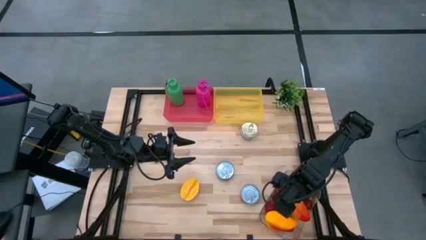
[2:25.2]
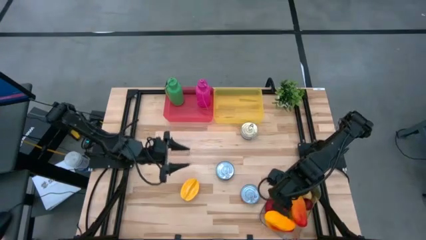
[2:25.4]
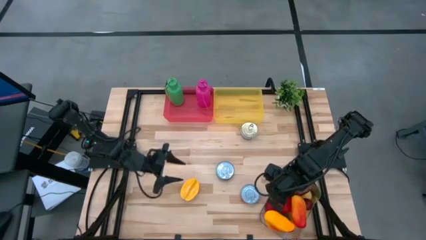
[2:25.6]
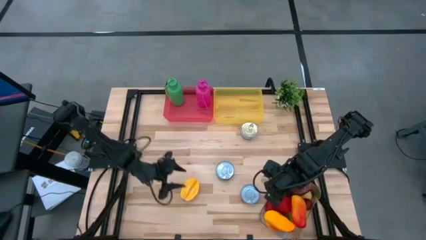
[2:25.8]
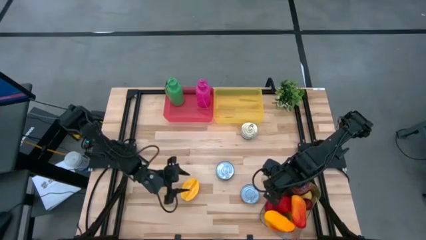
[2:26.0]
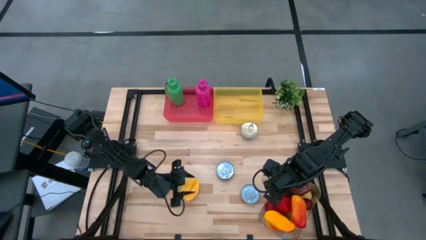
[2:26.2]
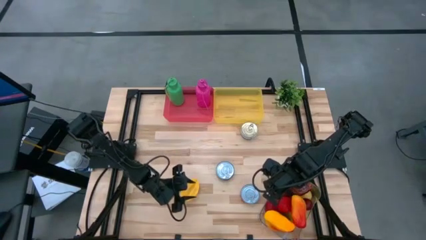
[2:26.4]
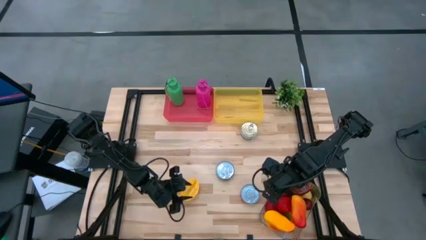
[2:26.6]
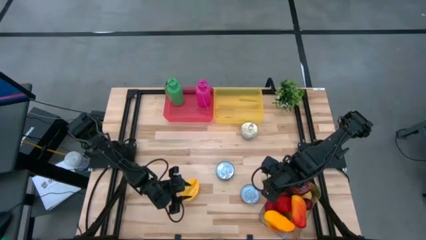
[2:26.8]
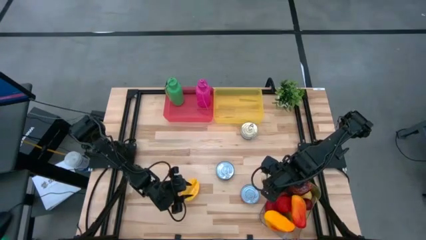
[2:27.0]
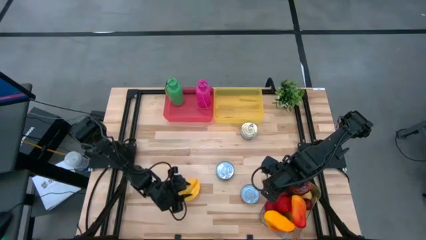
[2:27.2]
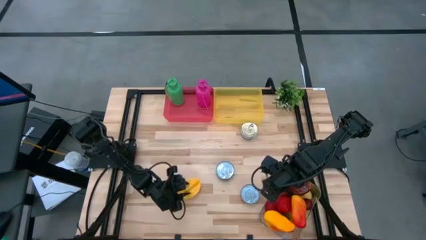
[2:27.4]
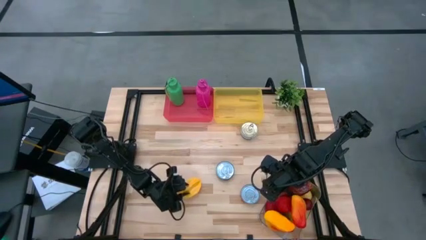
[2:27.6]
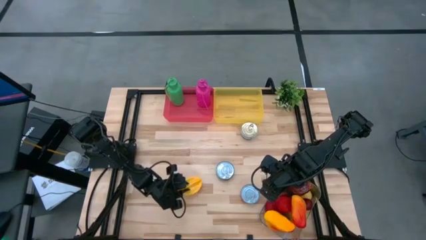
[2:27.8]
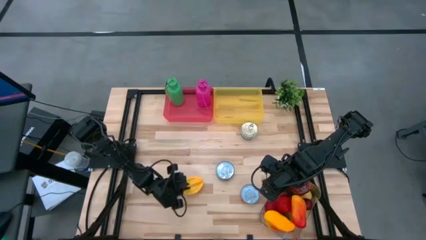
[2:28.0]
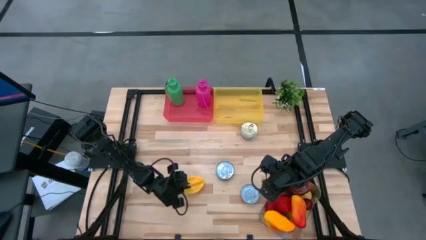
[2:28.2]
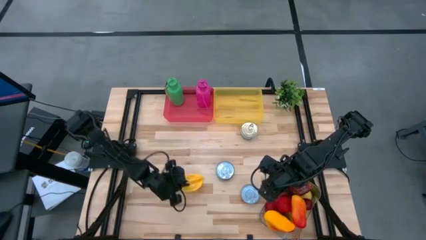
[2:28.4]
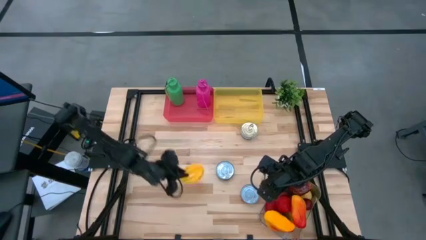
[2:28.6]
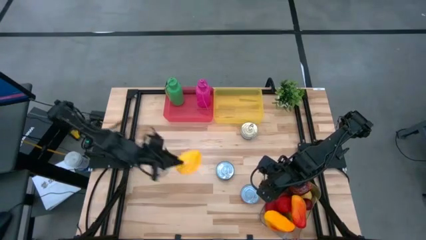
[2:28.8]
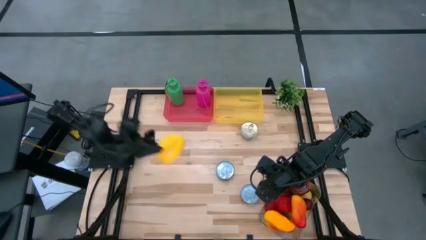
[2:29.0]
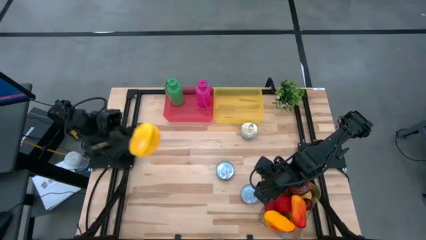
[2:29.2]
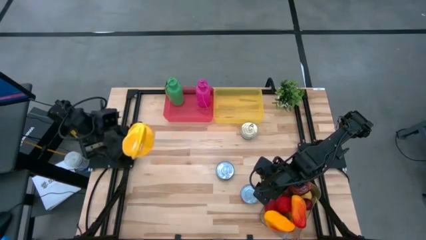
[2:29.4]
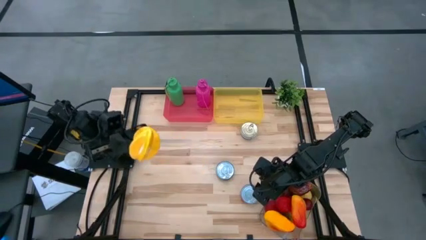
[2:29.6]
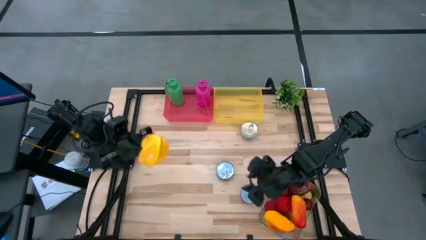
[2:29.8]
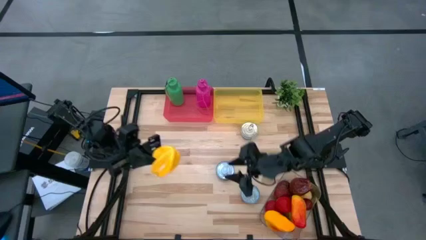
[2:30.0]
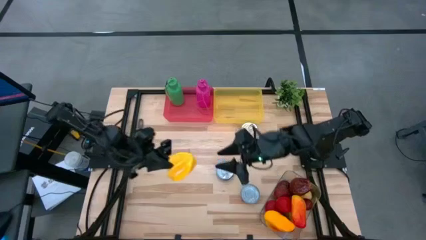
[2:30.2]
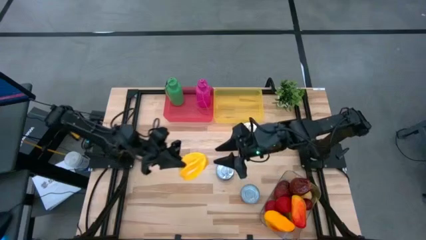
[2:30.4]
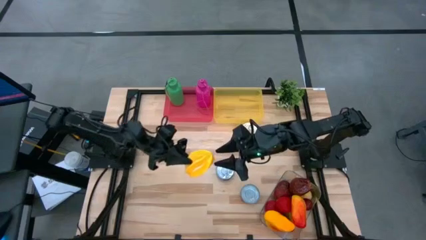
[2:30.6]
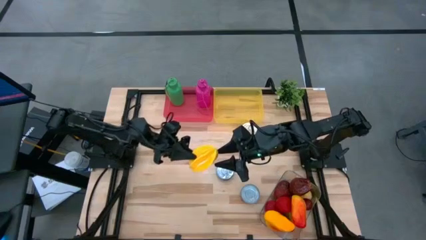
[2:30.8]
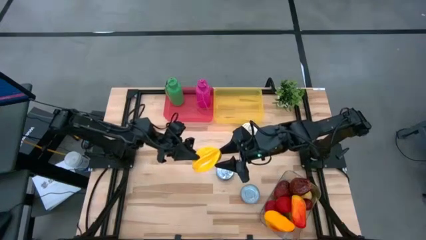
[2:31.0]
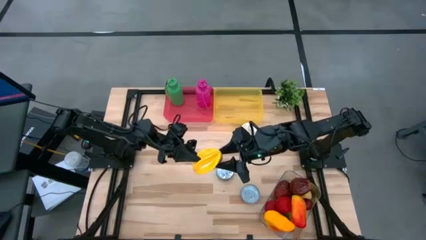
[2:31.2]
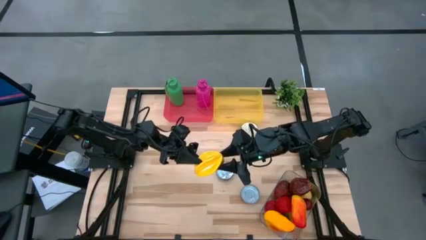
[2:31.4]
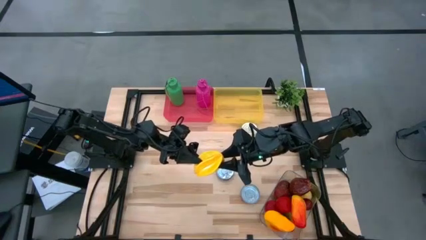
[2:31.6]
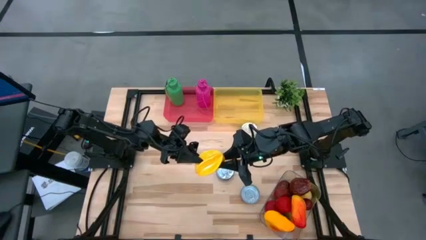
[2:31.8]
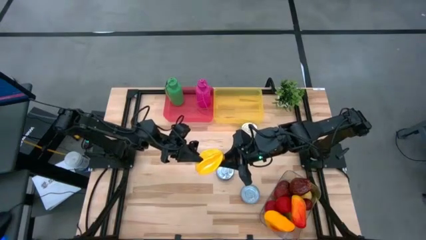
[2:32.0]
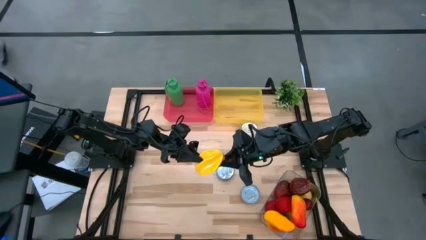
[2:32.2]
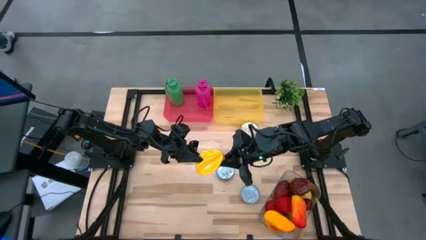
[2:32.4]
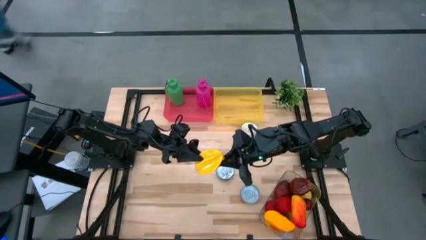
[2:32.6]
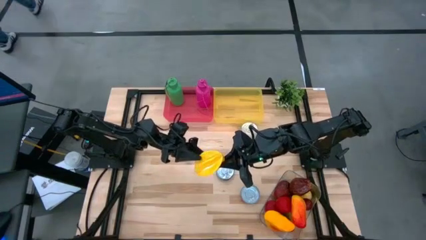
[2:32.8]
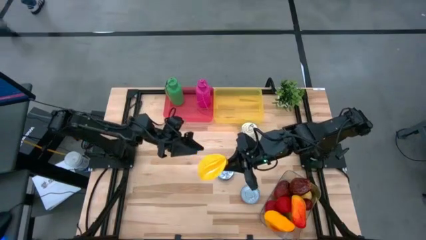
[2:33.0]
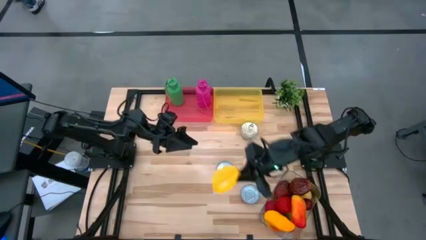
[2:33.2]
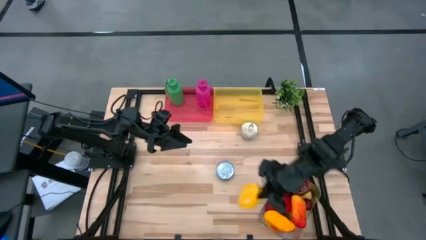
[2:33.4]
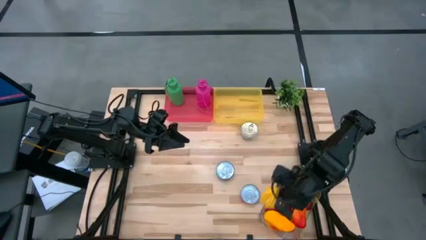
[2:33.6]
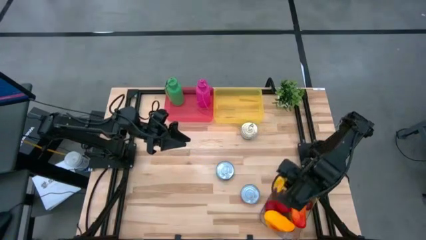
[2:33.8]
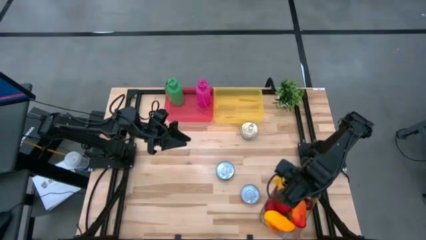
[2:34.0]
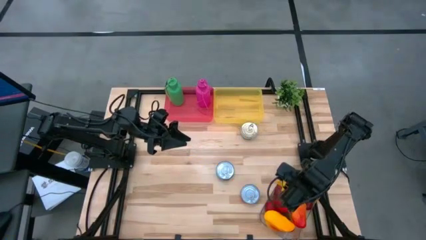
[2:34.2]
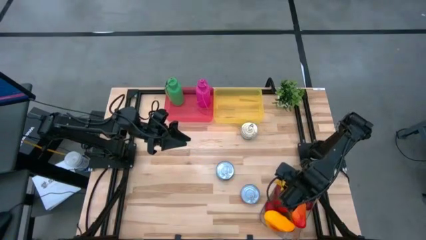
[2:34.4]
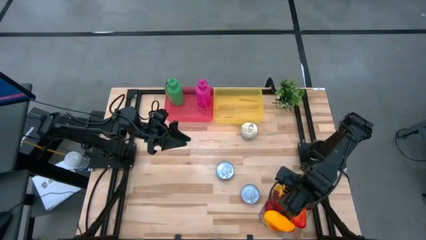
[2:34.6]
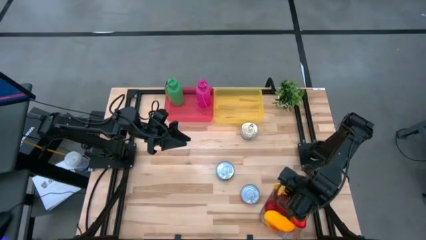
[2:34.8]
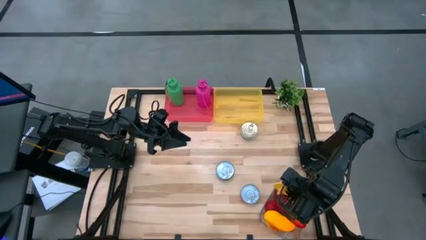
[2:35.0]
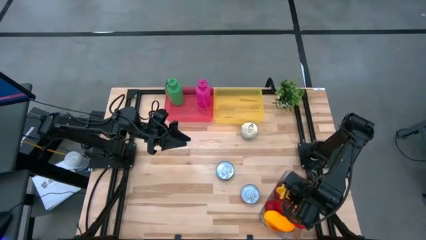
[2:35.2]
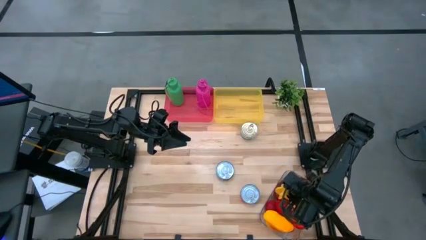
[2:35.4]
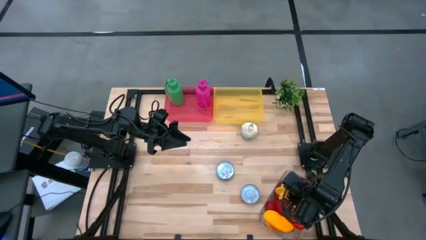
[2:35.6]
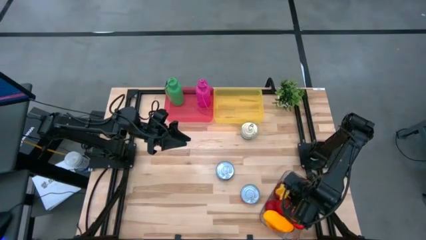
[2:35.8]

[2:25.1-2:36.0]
Task: Pick & Place Food Item
Put the starfruit into the transparent bin

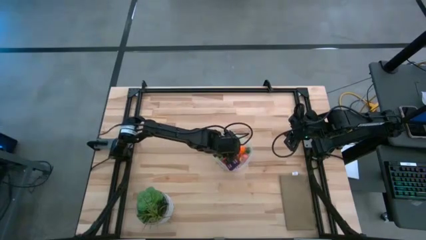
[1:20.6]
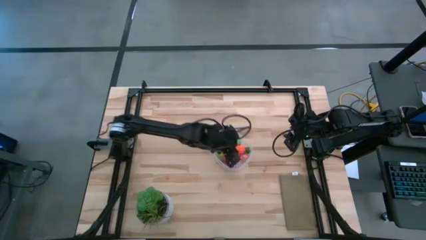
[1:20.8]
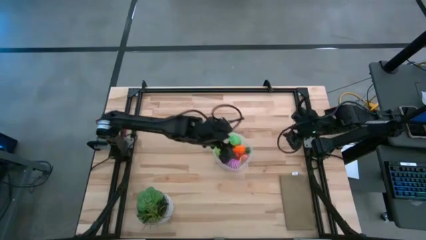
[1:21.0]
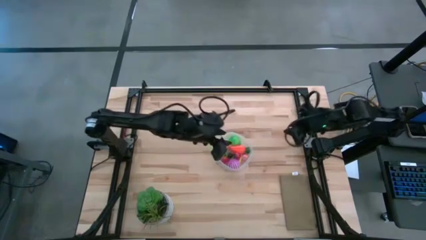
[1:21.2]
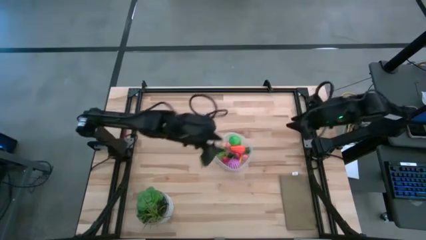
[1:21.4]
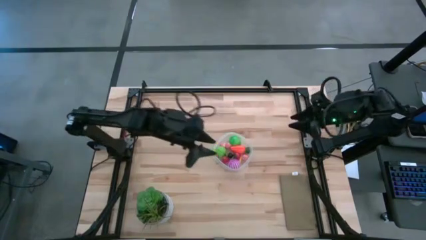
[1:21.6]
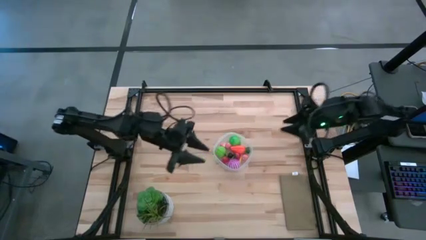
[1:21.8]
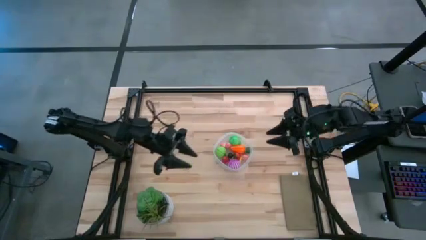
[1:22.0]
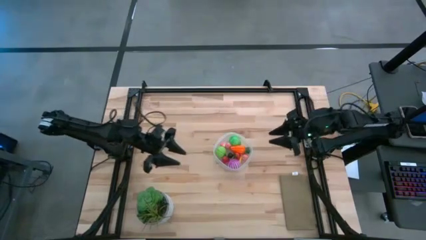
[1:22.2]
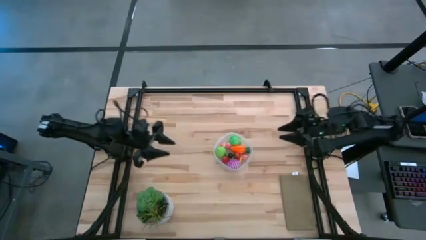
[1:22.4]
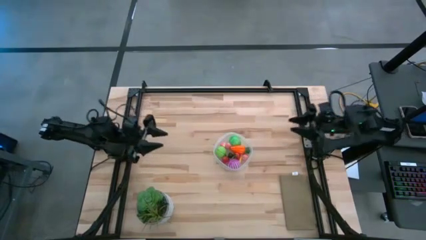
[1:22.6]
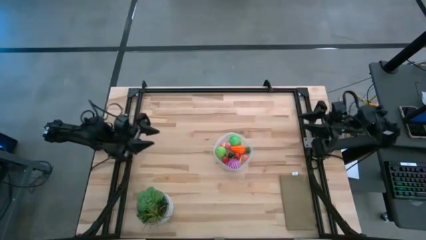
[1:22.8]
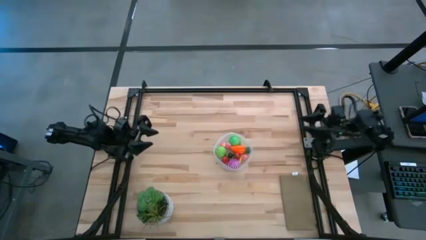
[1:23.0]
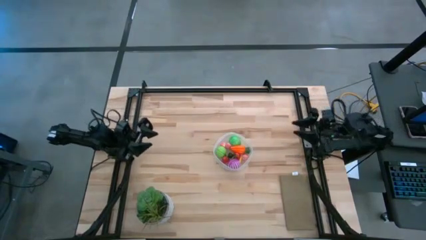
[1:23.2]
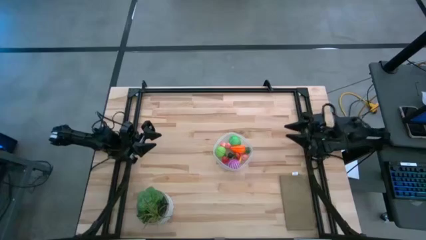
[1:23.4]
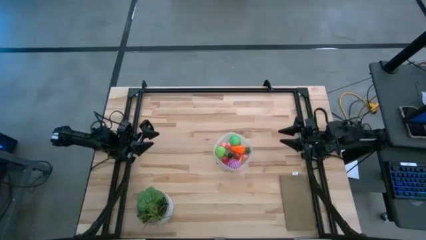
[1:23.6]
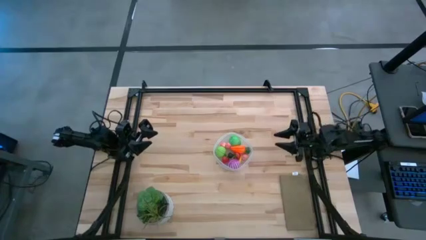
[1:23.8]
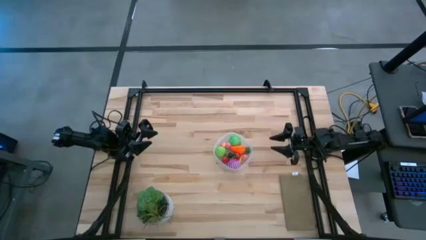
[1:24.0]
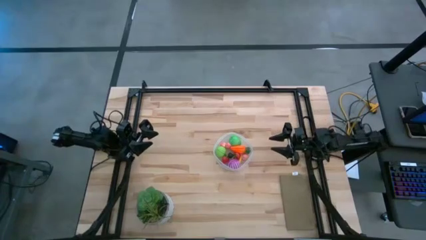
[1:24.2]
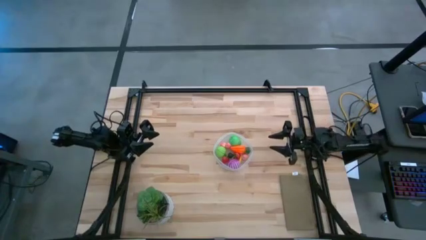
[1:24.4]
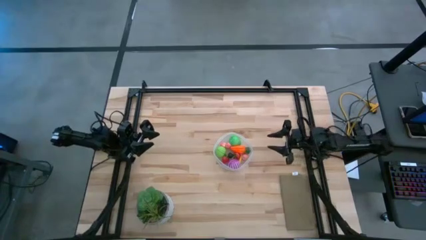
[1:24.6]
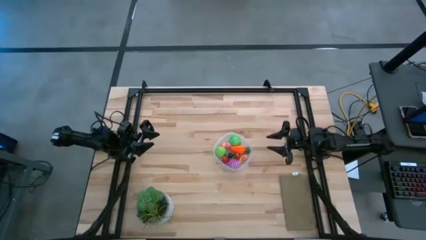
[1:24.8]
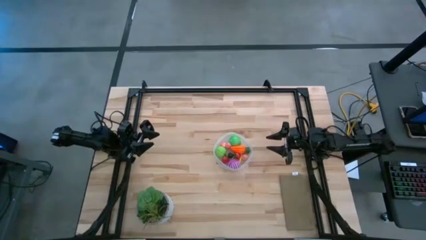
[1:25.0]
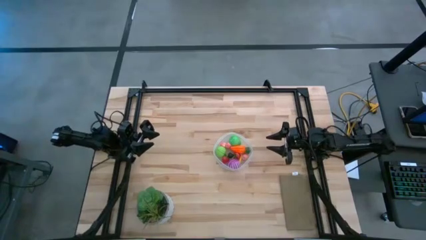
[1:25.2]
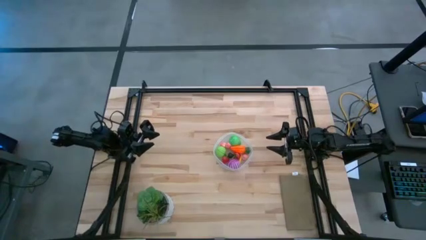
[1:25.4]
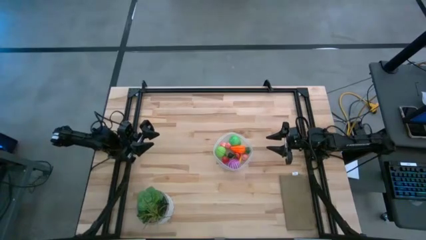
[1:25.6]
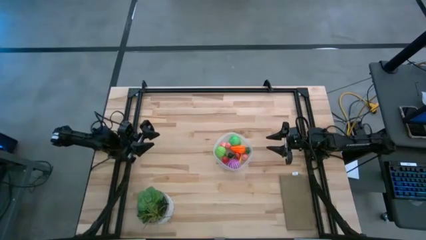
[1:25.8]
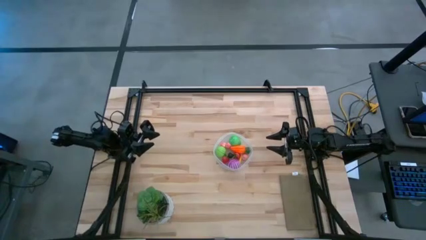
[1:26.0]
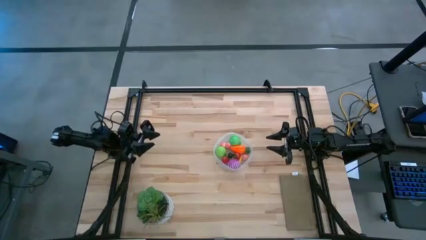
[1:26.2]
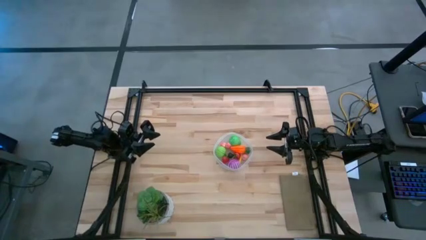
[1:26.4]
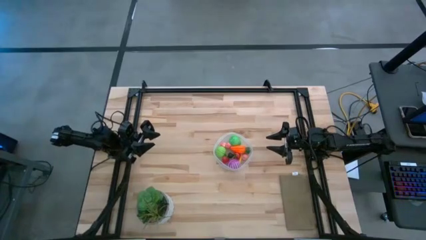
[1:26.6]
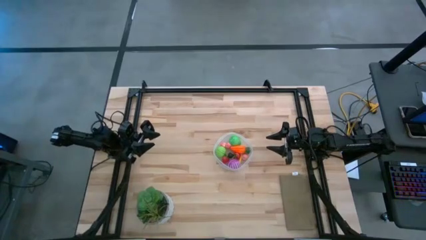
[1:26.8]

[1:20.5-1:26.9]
Task: Pick and placing Produce into tupperware
Return to Home Position
